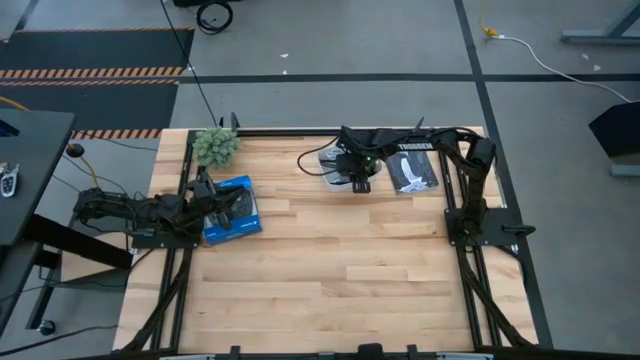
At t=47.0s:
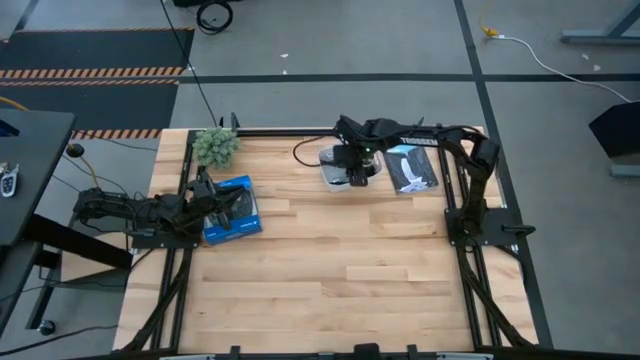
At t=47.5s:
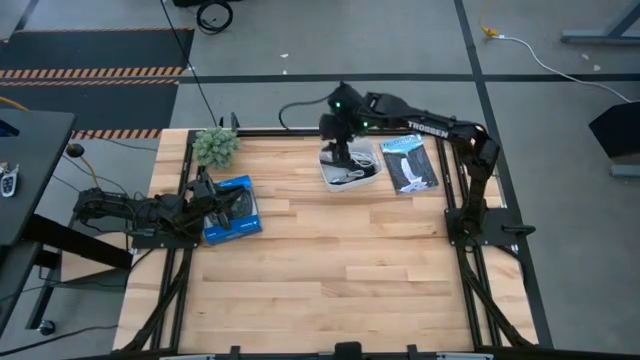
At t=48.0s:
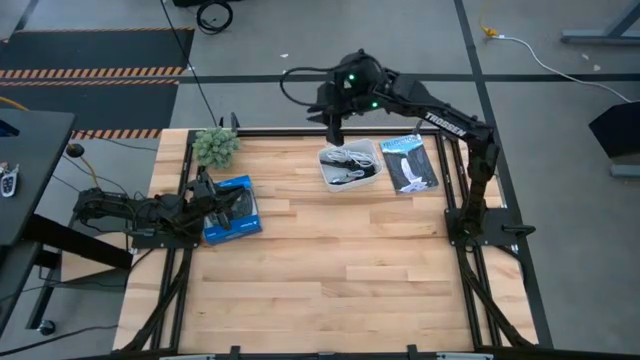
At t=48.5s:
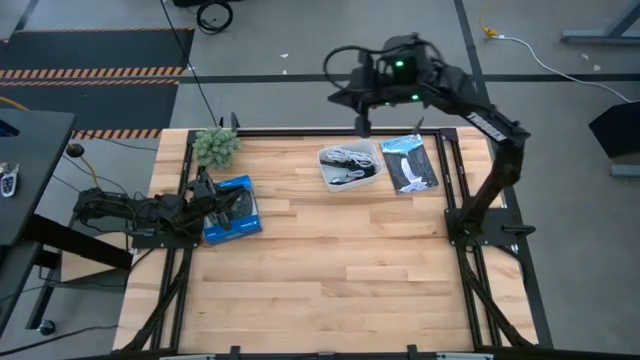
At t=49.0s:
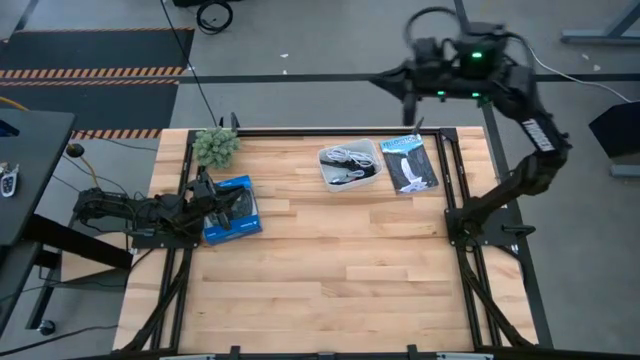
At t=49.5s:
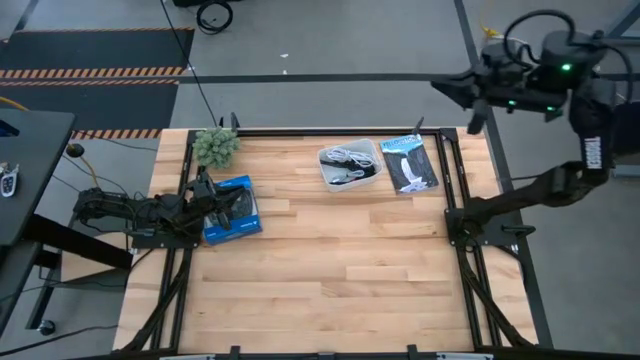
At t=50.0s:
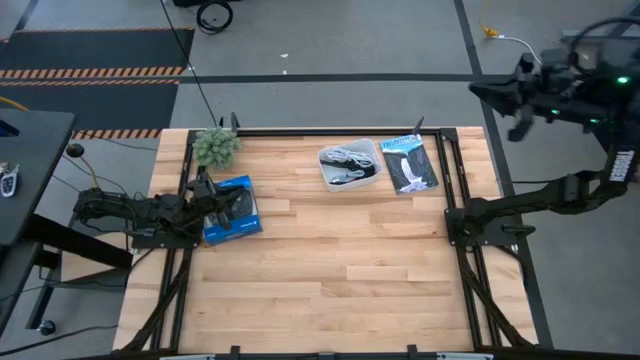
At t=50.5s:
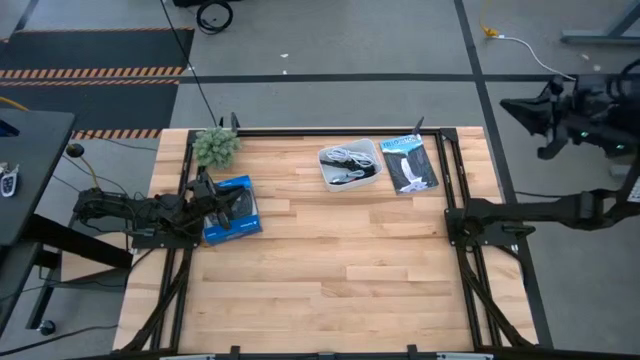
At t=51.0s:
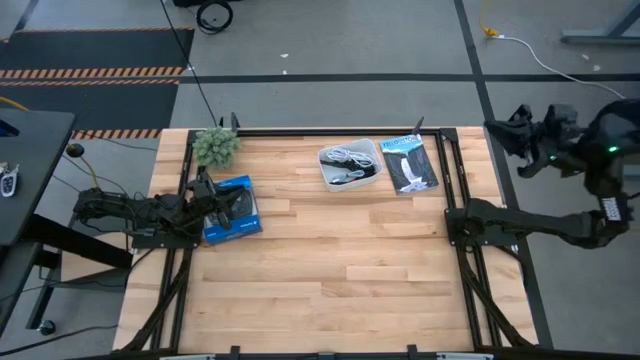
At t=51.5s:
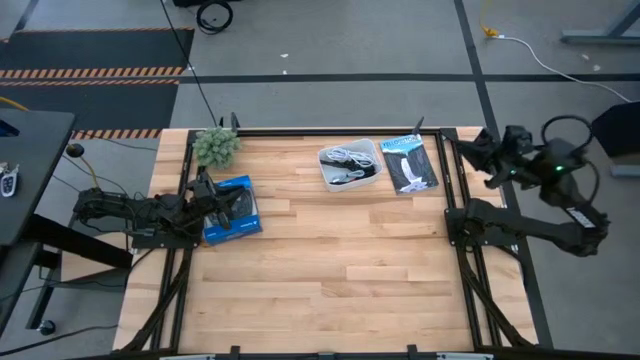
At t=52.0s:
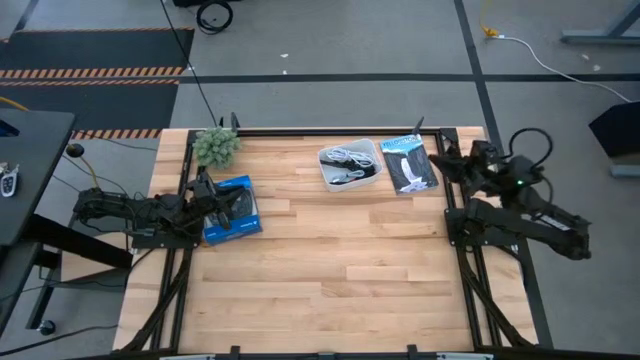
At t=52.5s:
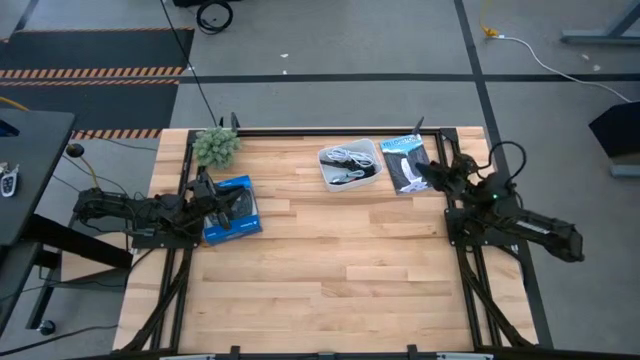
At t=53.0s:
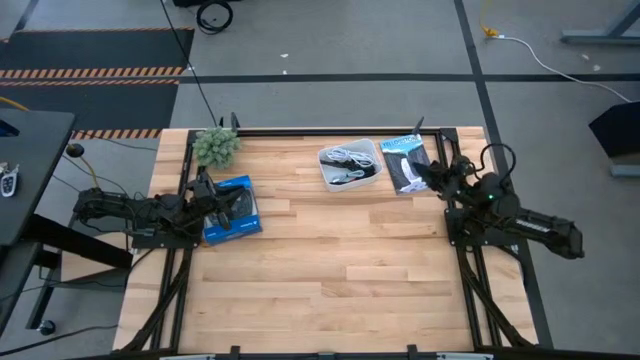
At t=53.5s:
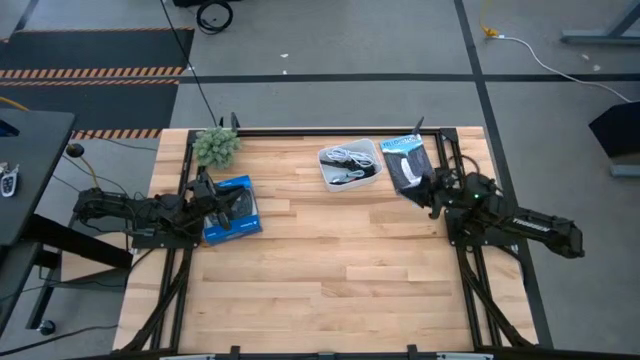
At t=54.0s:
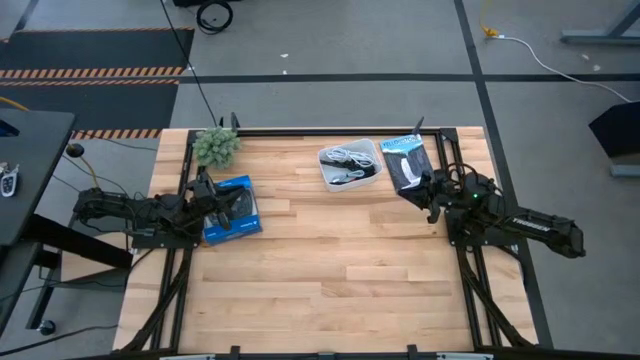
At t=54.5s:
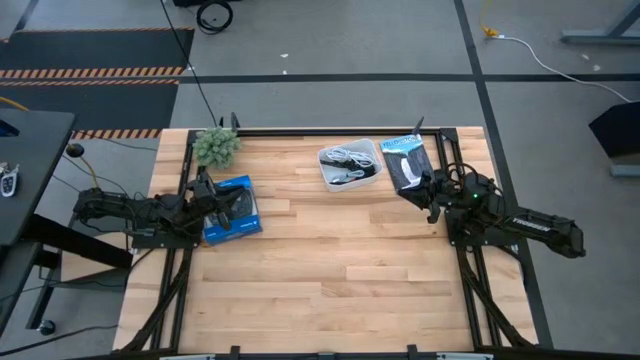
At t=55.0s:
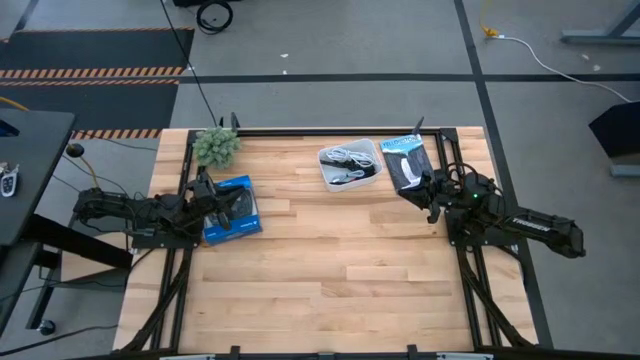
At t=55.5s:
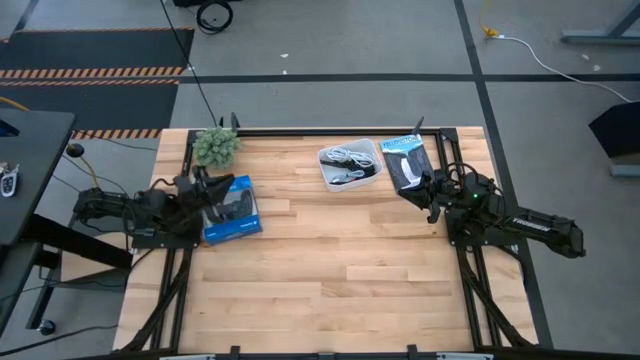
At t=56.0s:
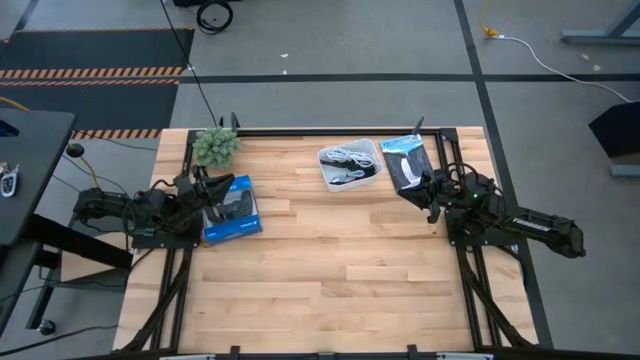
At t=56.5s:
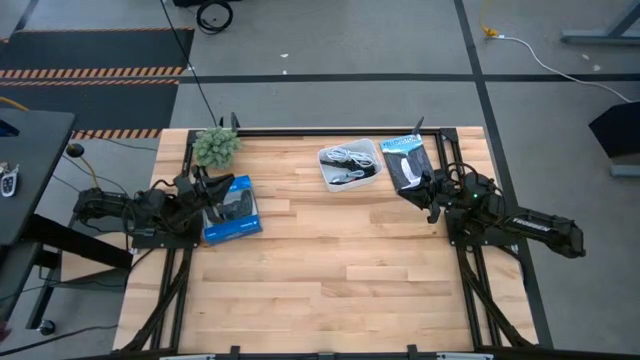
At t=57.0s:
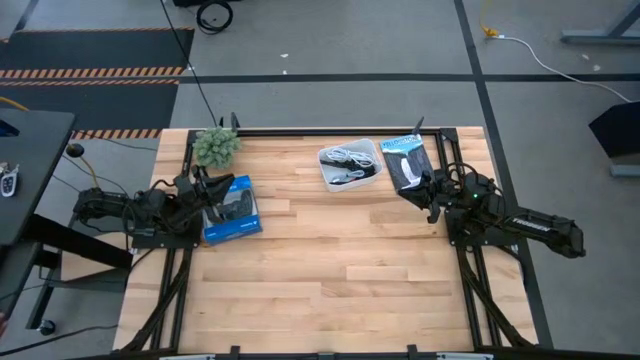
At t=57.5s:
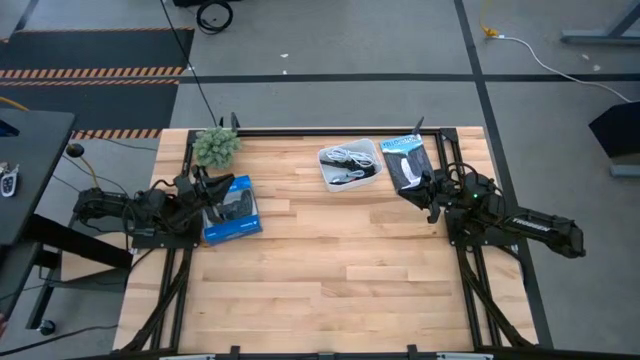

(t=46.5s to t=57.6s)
Task: Pick and place USB-C Cables
Return to Home Position

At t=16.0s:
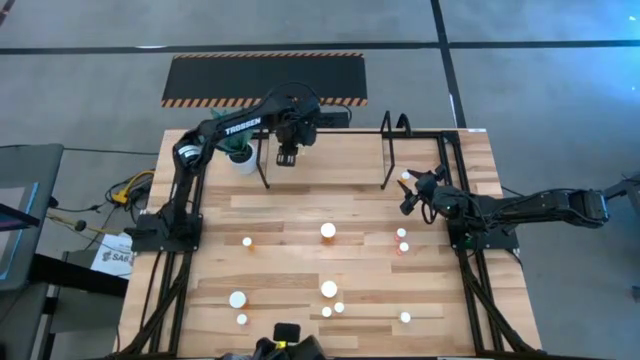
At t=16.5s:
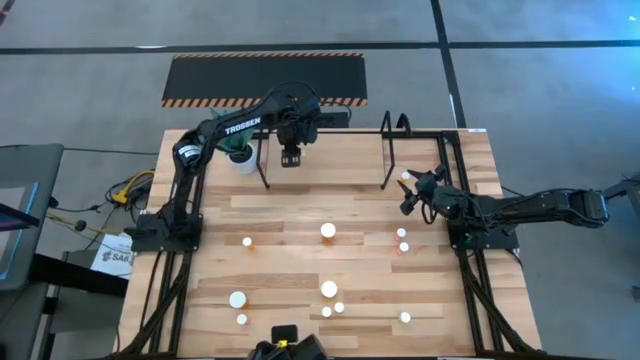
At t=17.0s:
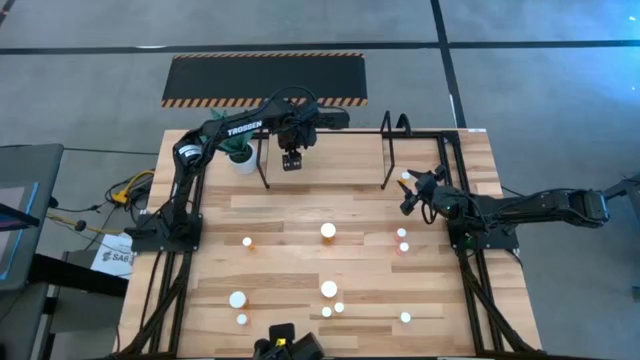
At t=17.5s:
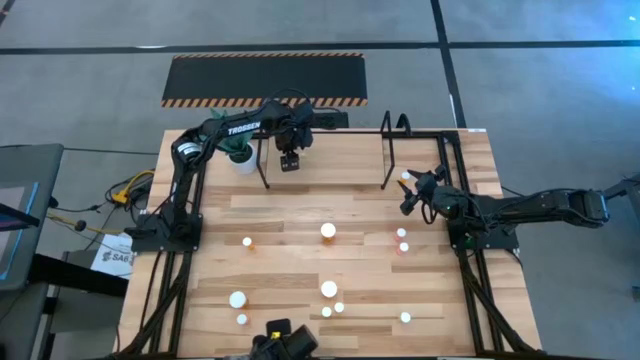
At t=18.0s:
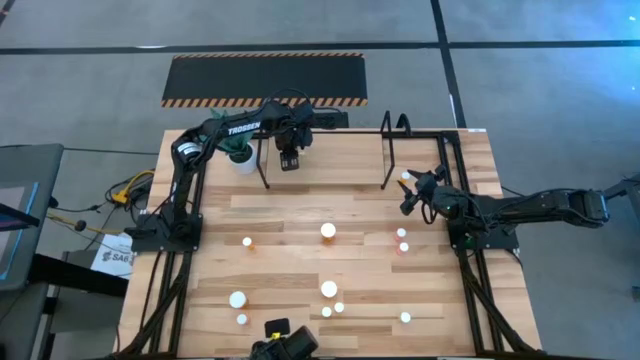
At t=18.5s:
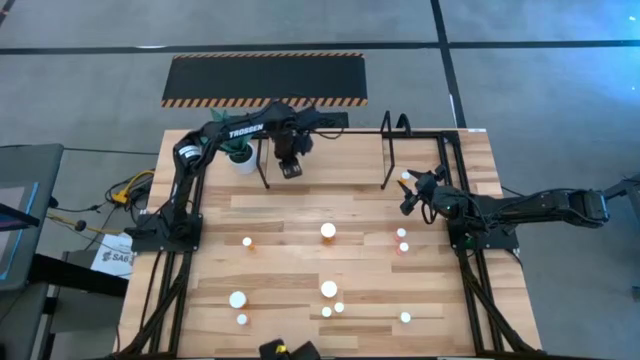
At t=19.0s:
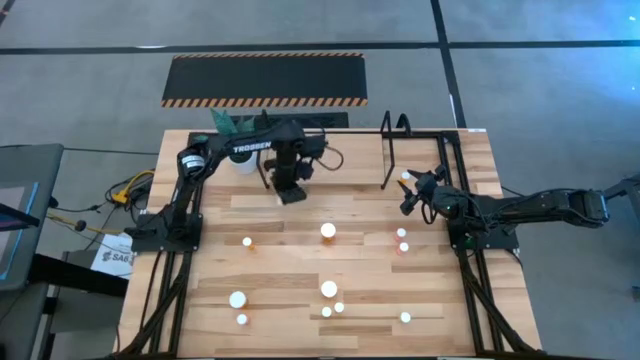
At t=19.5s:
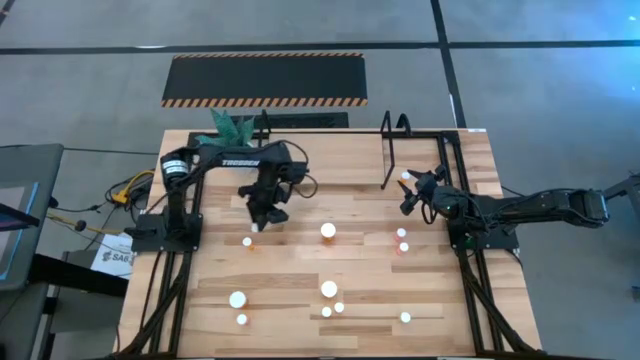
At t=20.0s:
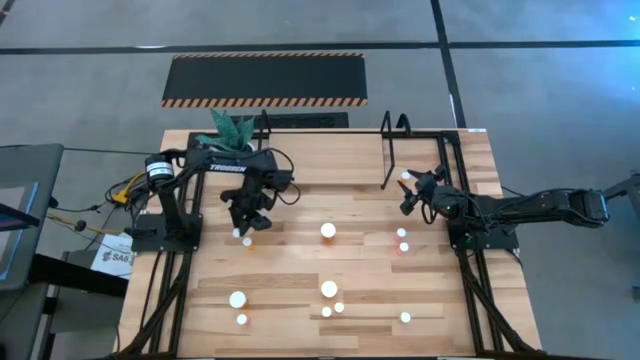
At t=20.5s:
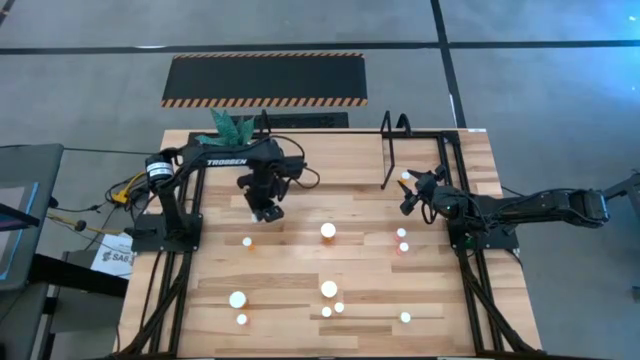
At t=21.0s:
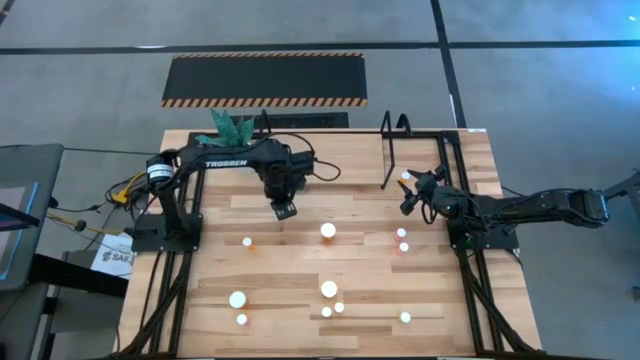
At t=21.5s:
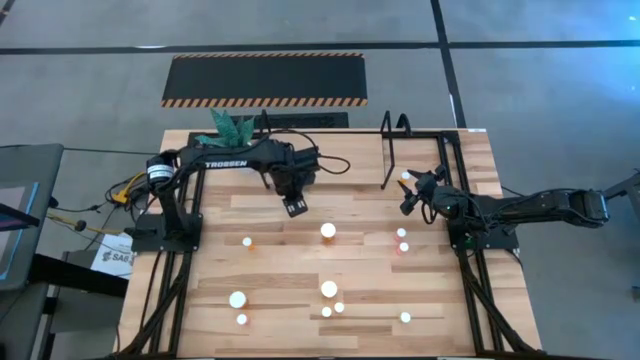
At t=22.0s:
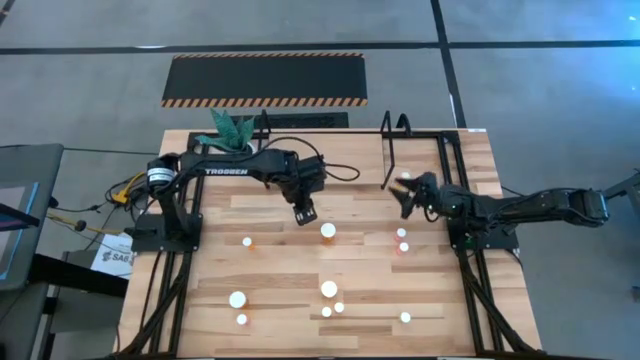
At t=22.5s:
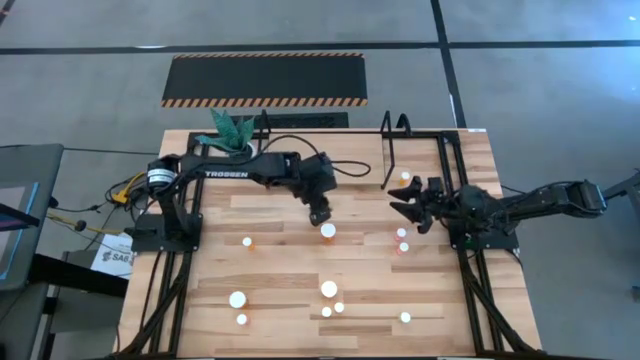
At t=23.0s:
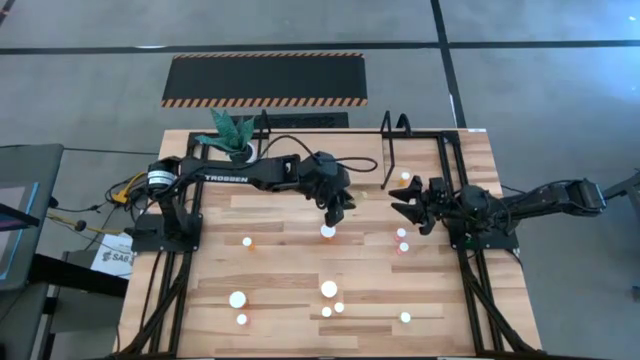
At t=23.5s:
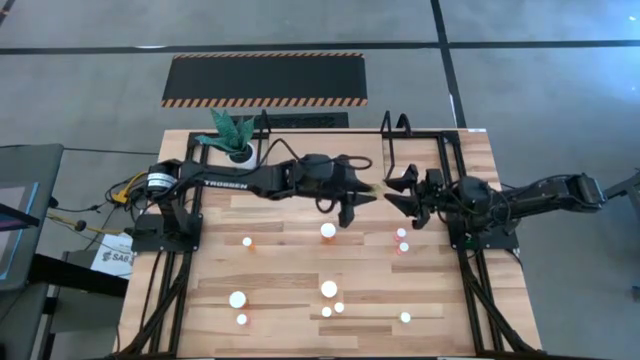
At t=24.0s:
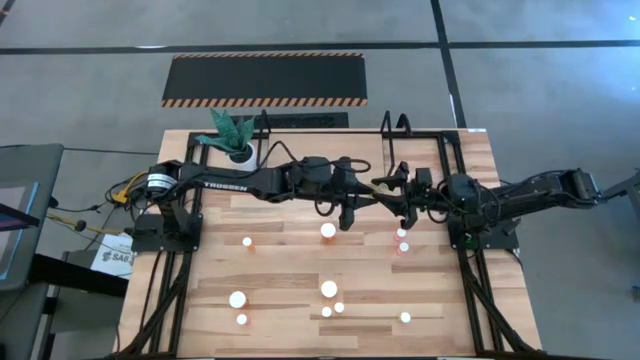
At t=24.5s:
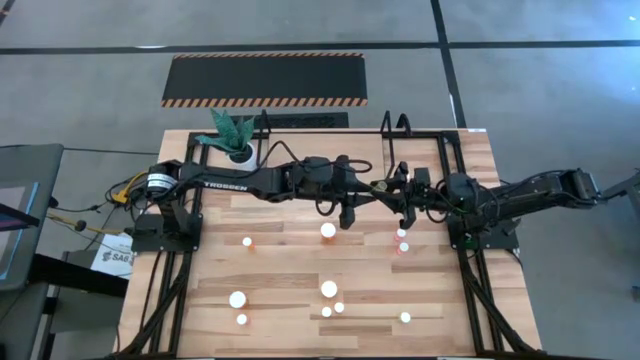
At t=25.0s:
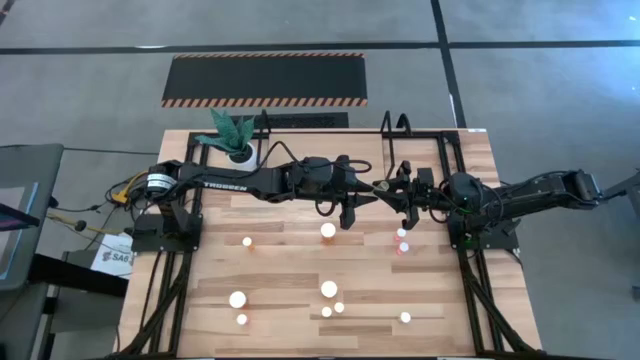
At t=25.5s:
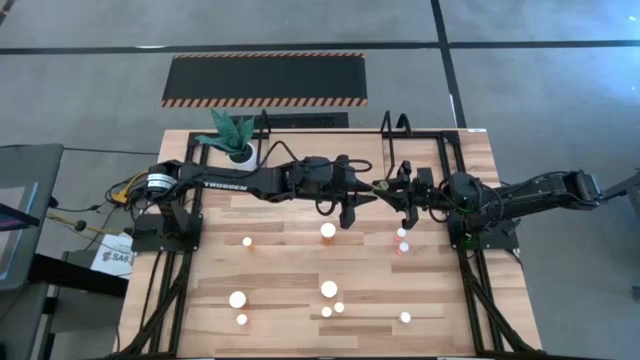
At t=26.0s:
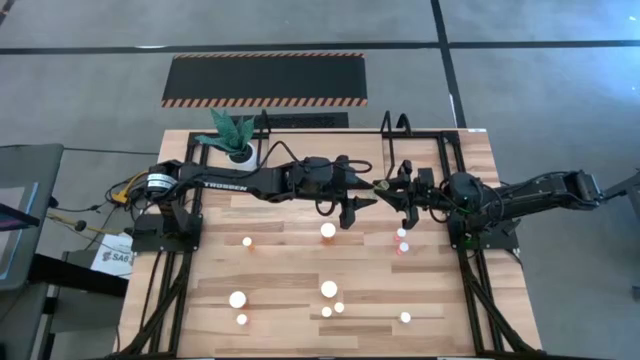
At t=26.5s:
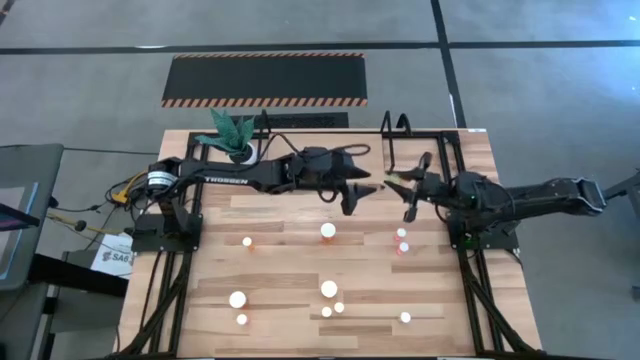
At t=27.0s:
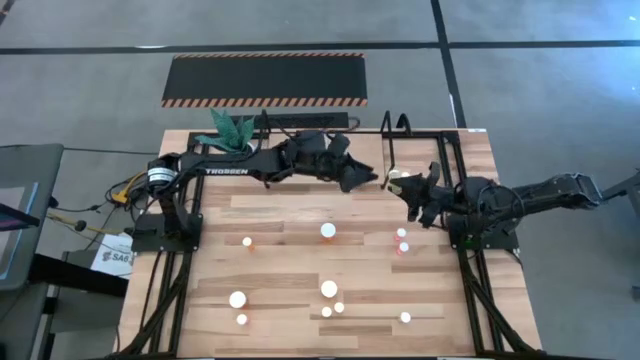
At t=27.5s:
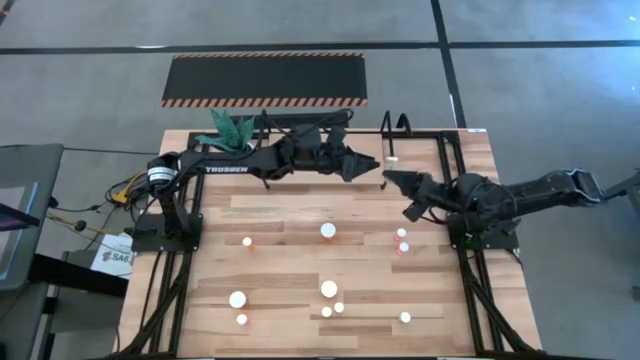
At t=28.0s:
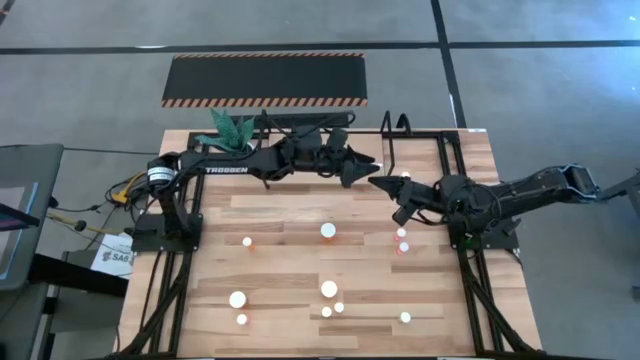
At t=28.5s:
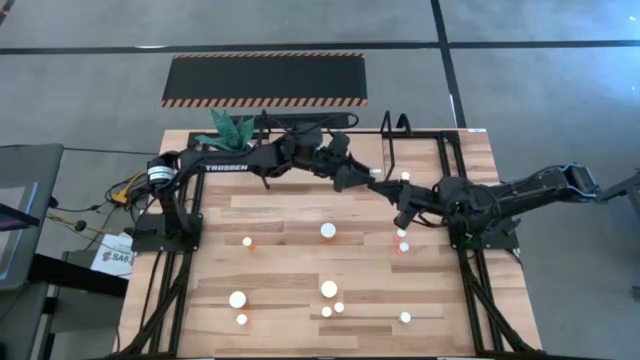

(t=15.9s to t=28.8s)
Task: Pick and place medicine bottles onto shelf by color
Put the top left yellow pill bottle on the shelf
